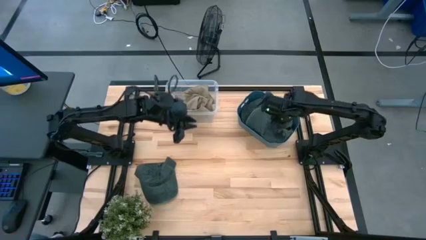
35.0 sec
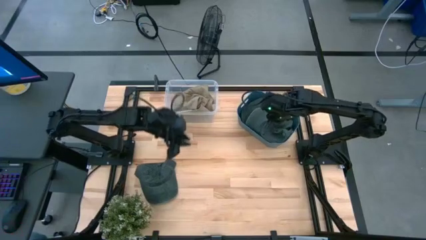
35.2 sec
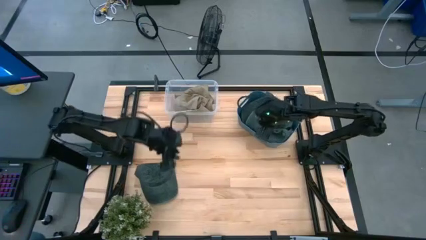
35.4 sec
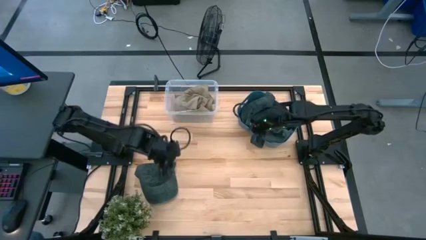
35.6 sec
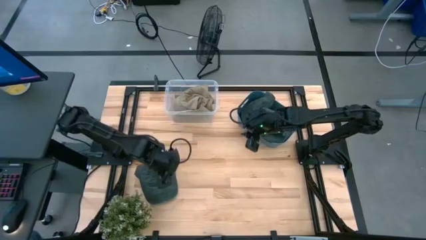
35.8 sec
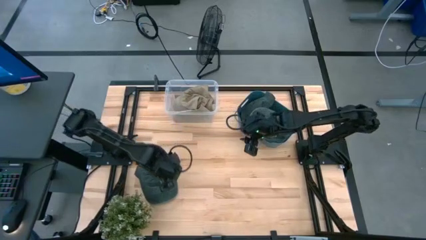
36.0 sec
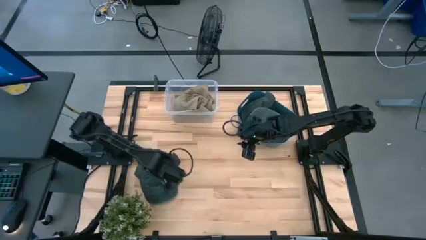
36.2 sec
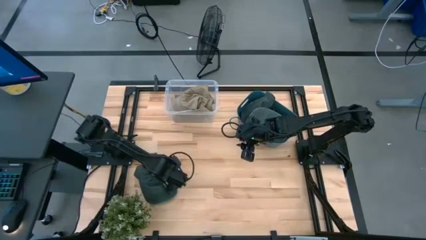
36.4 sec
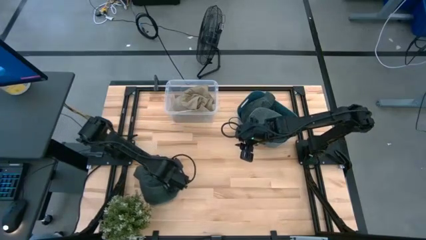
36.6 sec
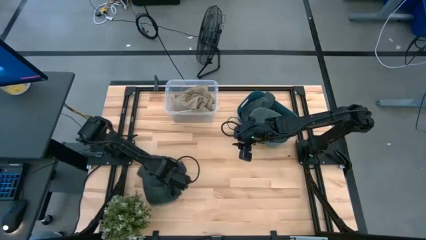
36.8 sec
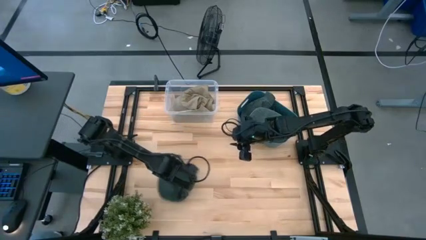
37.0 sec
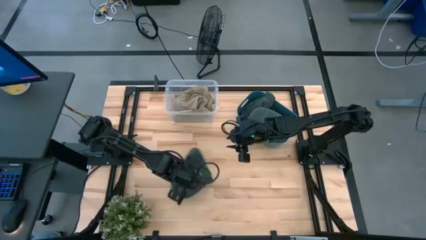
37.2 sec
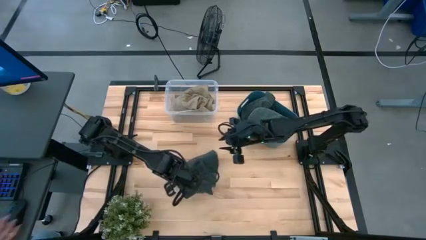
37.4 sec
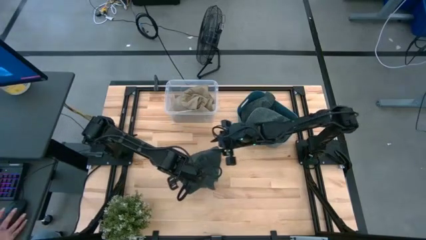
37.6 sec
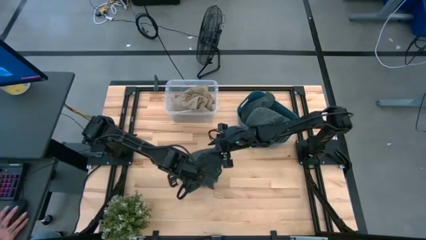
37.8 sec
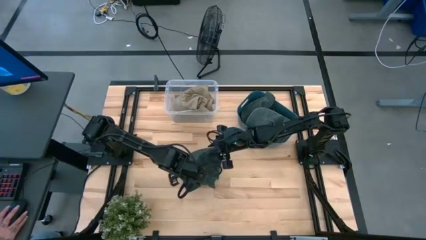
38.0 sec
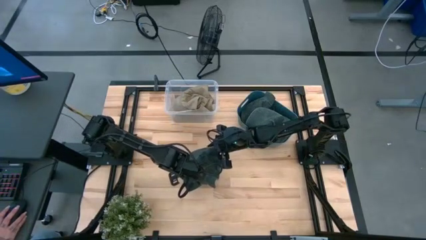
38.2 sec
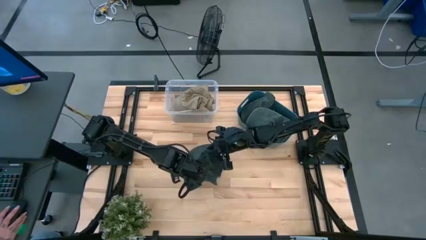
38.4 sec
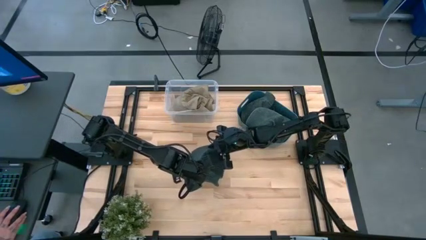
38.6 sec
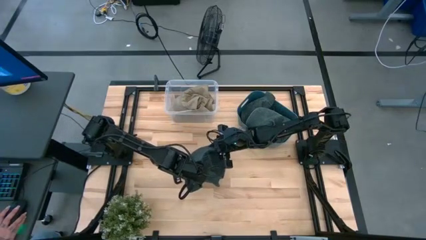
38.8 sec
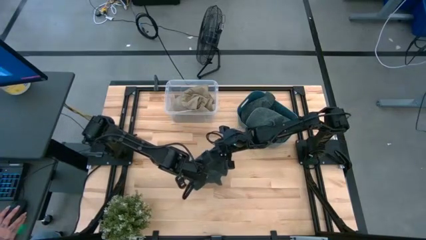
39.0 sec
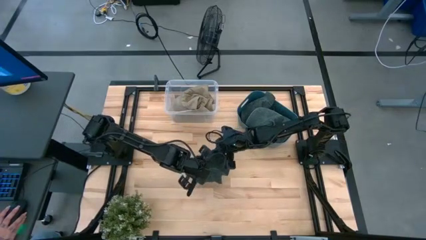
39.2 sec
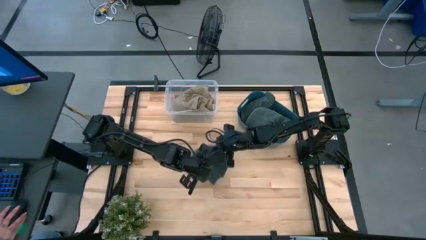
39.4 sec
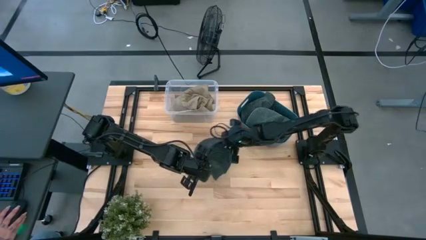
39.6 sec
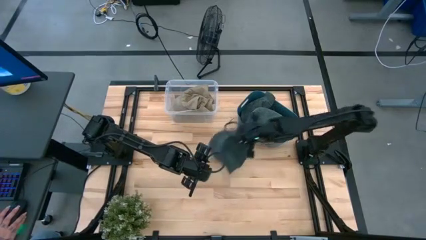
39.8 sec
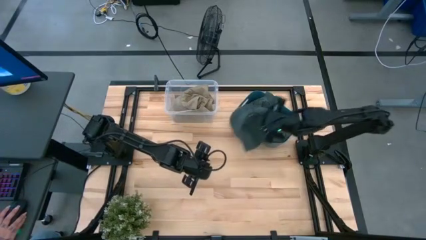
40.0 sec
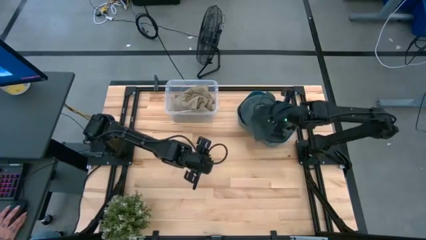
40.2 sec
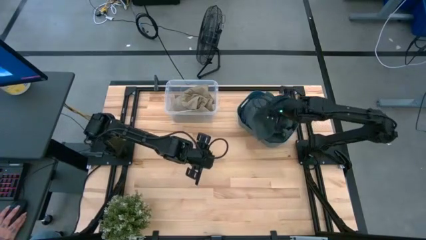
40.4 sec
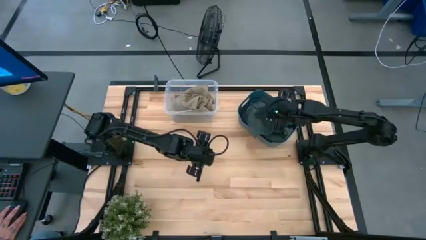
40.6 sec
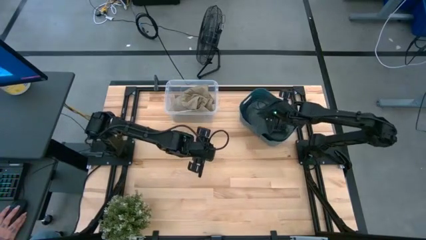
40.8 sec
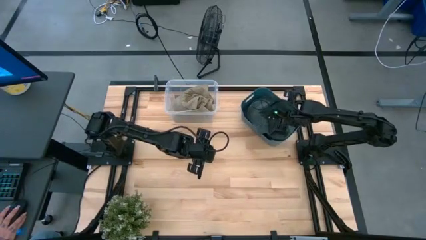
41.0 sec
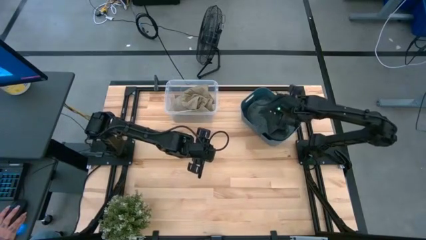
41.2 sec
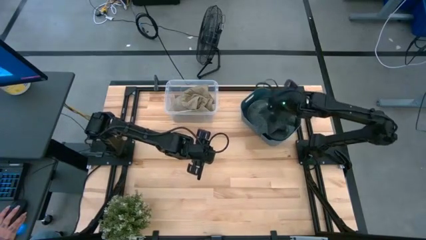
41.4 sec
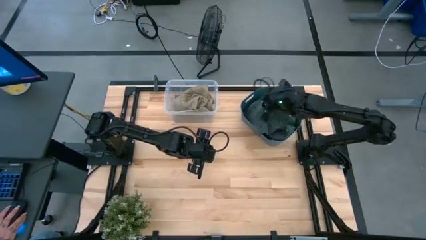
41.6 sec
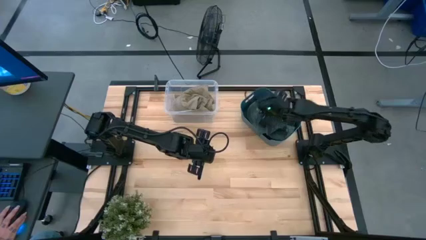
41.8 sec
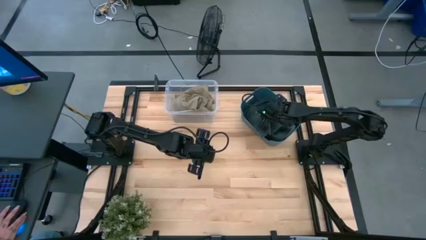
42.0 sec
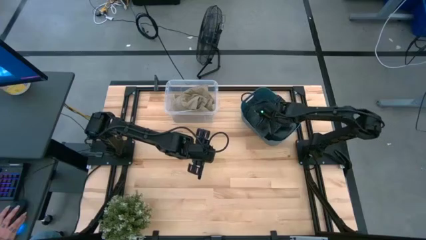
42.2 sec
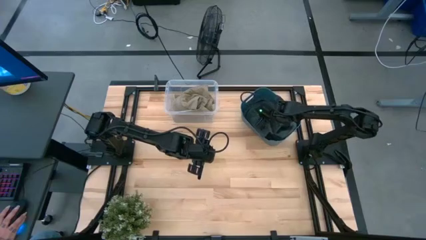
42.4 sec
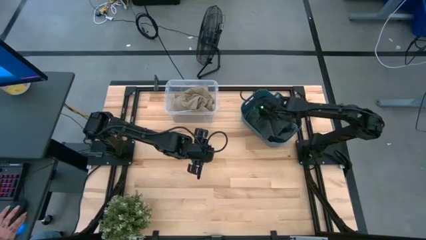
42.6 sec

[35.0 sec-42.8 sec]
Task: Pick & Place hat
Put the black cap into the blue bin

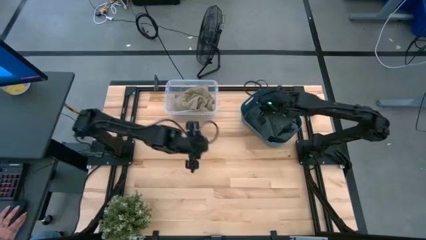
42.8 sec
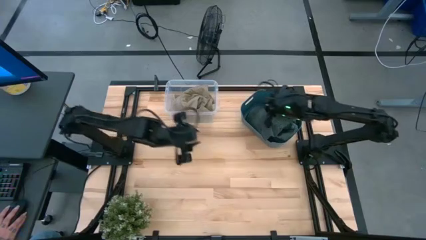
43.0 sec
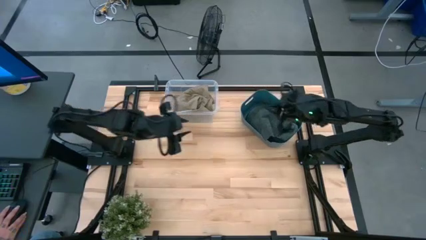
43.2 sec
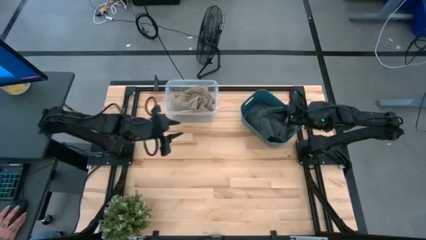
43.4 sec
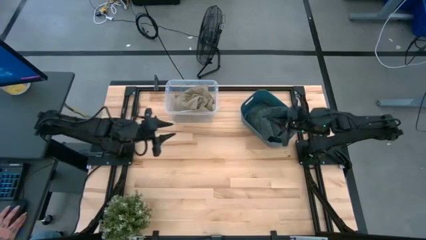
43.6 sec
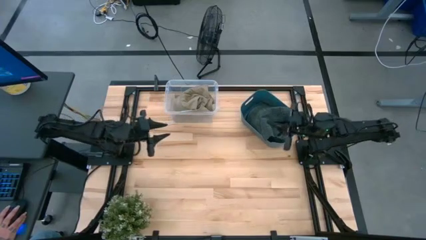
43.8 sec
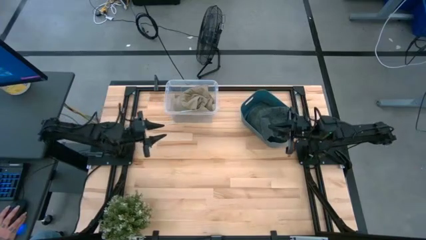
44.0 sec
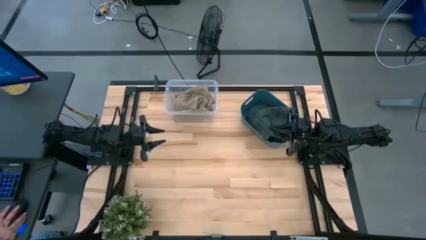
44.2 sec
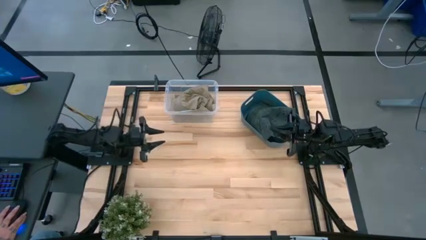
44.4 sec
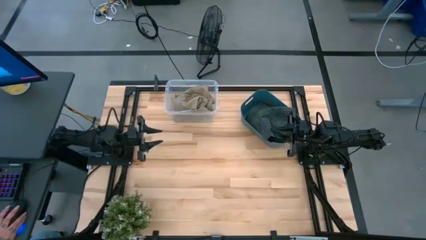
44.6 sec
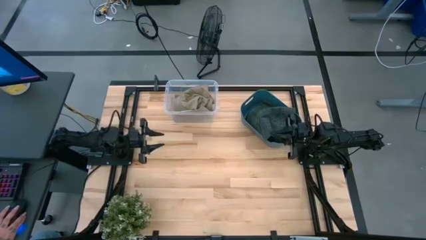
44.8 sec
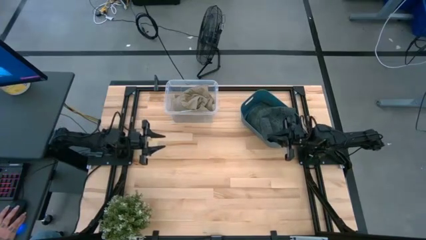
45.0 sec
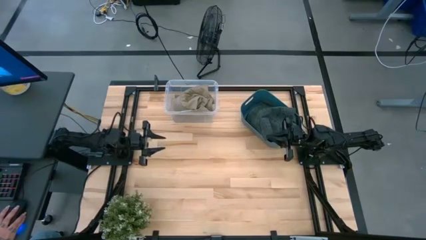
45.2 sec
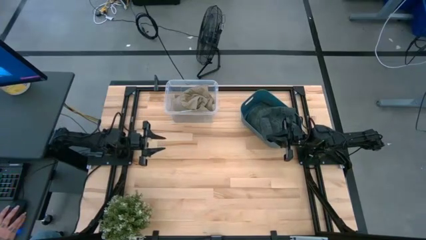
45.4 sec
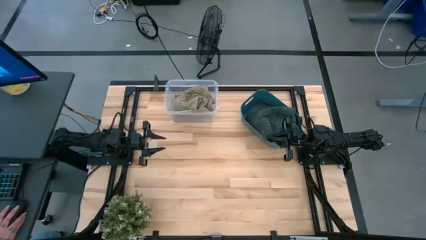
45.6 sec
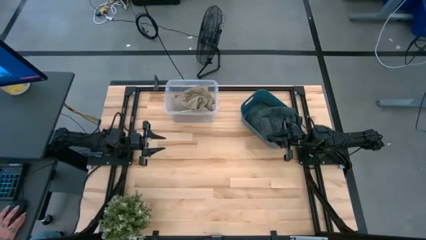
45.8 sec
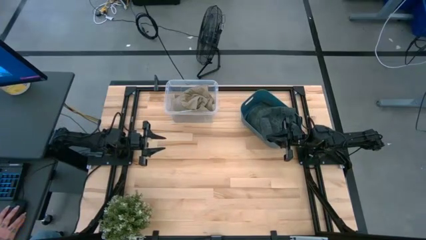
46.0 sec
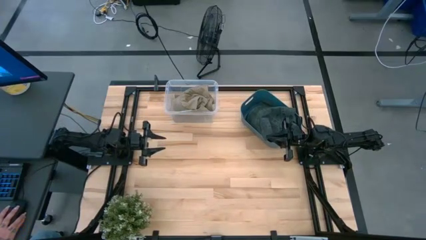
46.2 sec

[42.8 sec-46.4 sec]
Return to Home Position

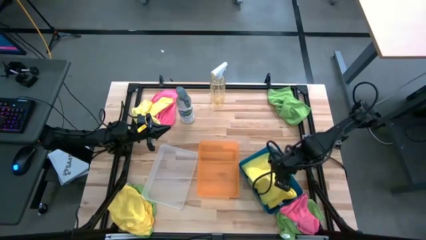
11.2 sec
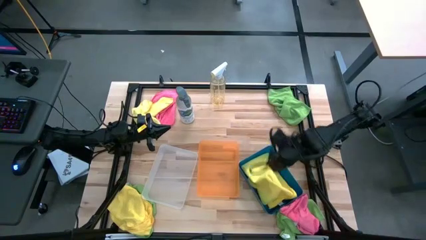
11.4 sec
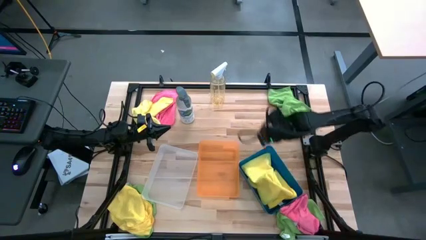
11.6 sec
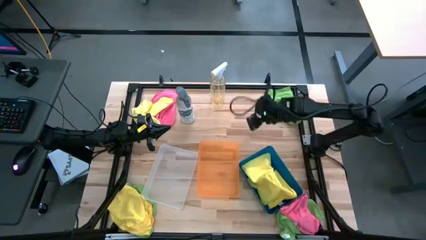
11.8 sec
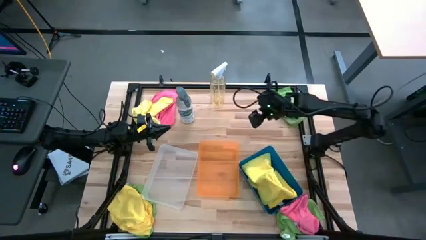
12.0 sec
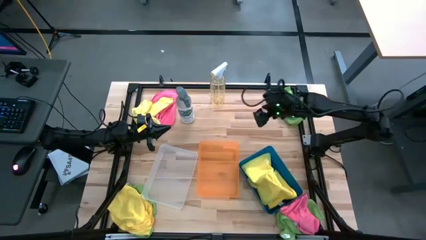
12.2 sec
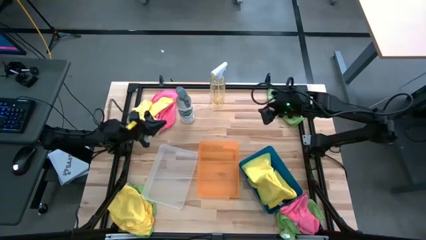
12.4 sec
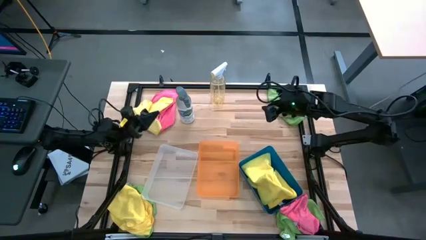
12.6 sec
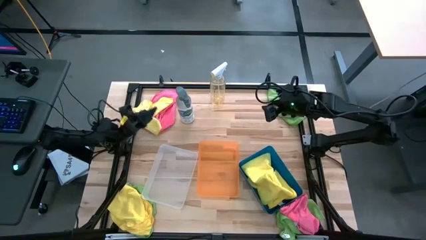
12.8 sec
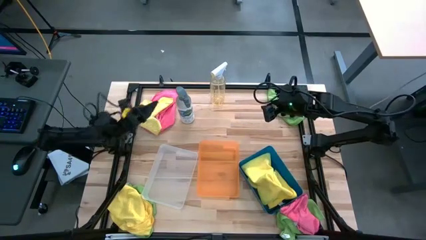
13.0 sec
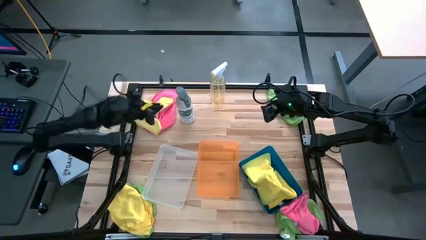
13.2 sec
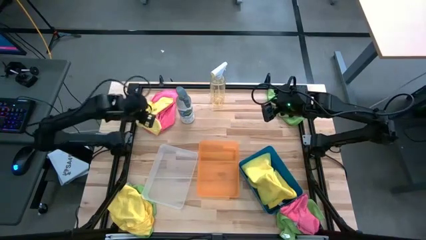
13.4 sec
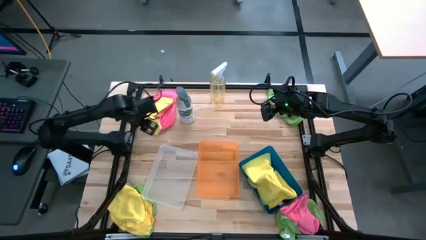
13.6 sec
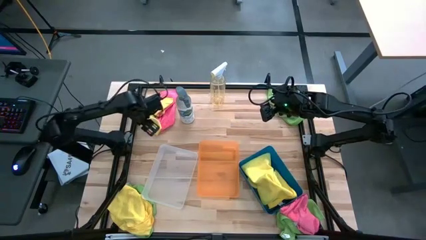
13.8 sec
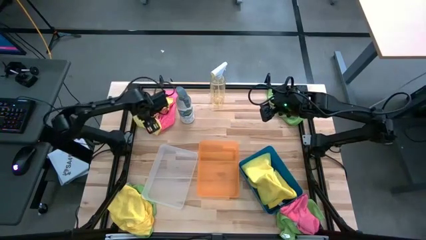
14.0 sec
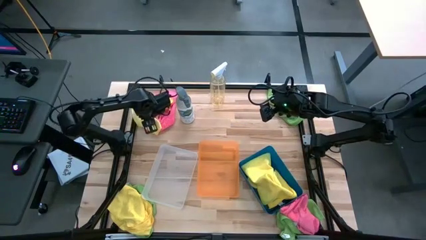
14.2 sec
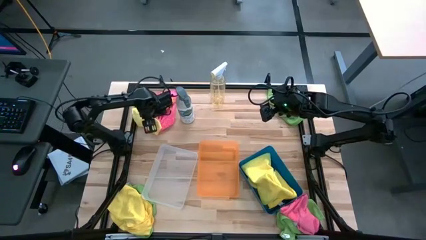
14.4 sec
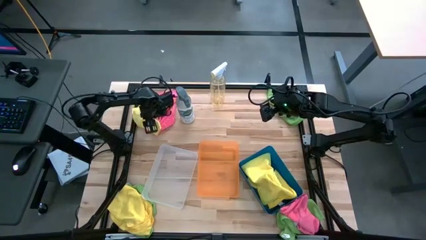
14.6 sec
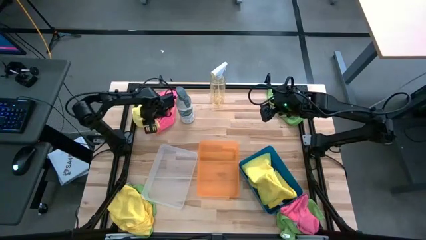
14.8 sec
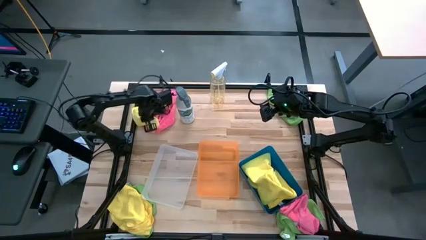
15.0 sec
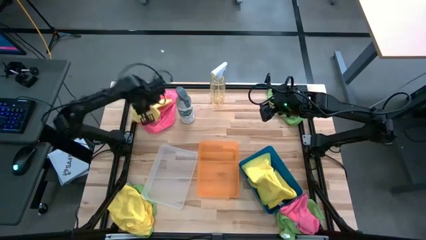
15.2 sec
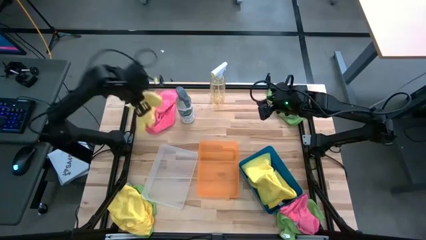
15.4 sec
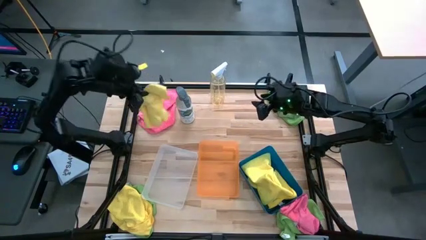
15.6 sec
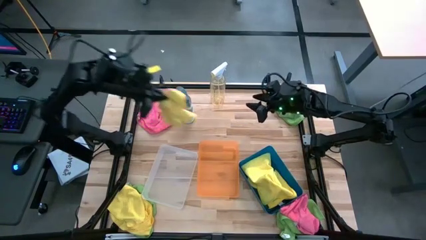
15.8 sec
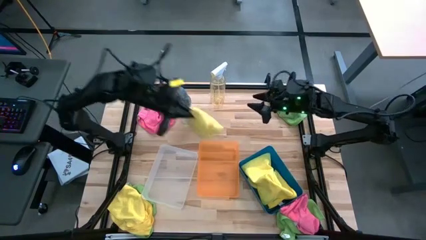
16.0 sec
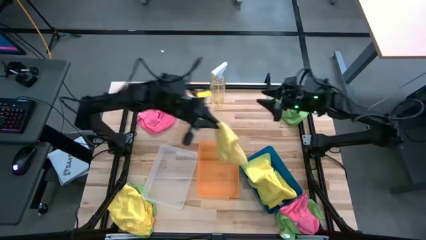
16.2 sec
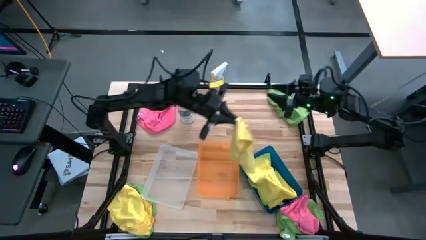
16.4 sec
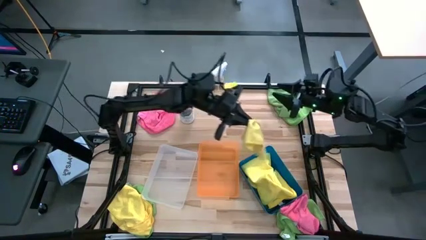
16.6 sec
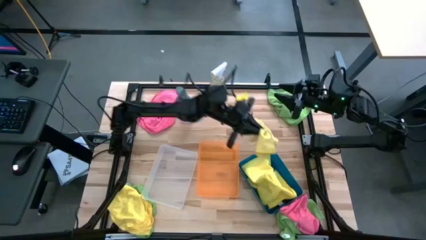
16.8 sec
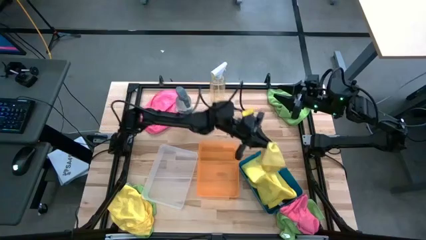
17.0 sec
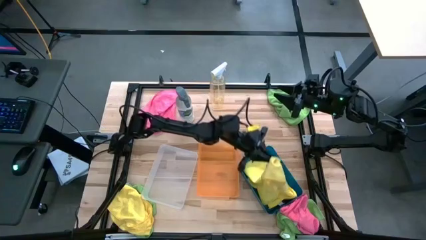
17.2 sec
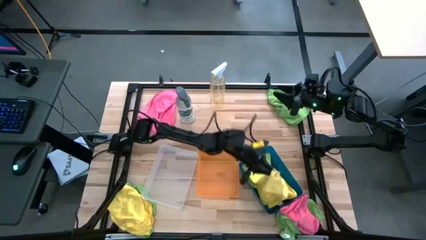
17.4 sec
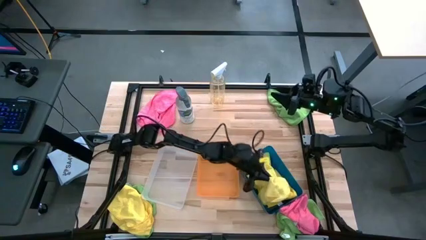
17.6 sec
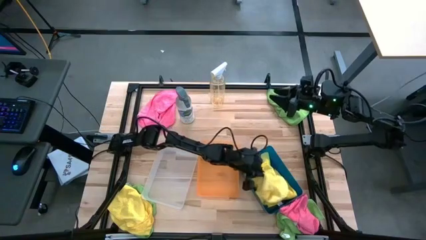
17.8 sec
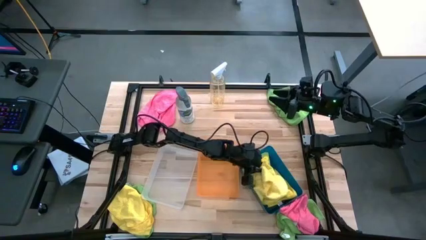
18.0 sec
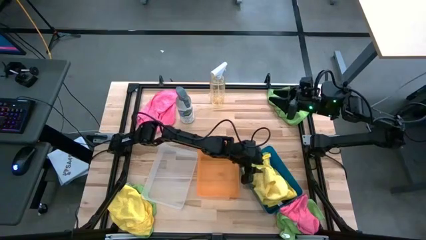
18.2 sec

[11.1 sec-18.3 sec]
Task: Sort microfiber towel by color & place in baskets
Put the top yellow microfiber cloth into the blue bin
